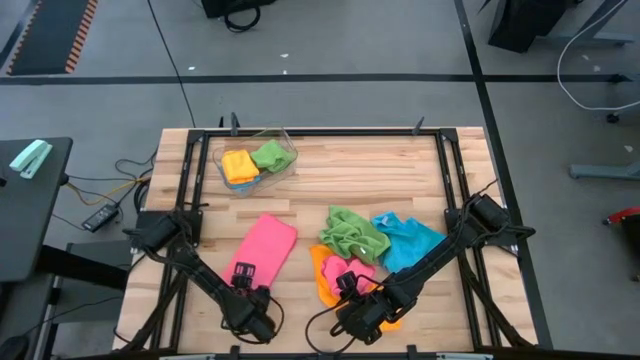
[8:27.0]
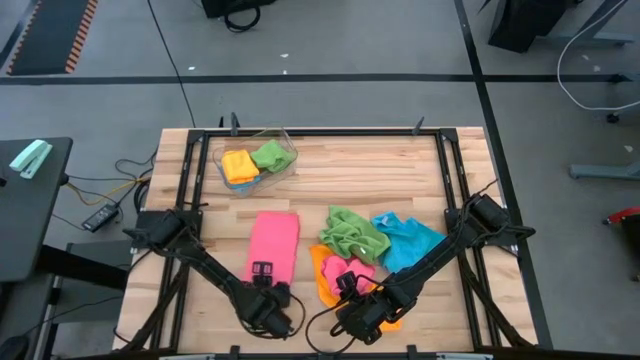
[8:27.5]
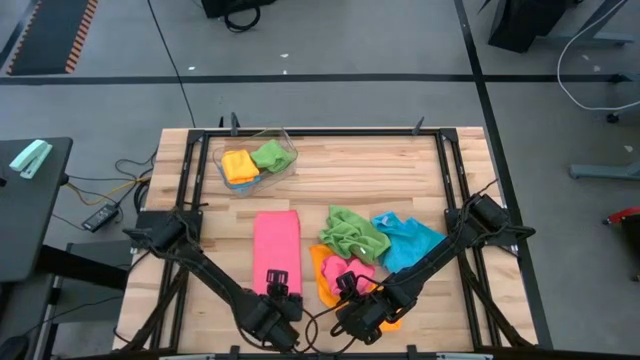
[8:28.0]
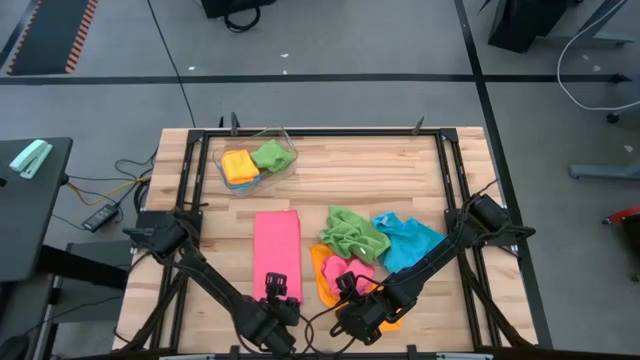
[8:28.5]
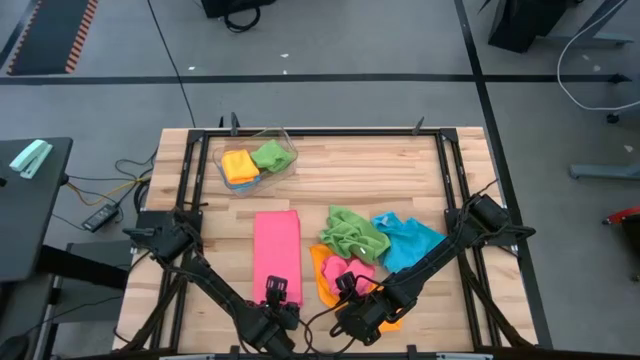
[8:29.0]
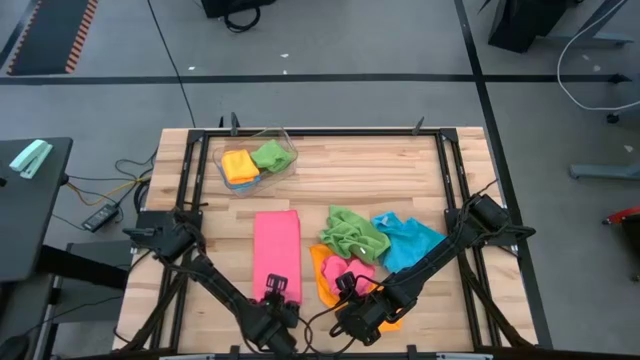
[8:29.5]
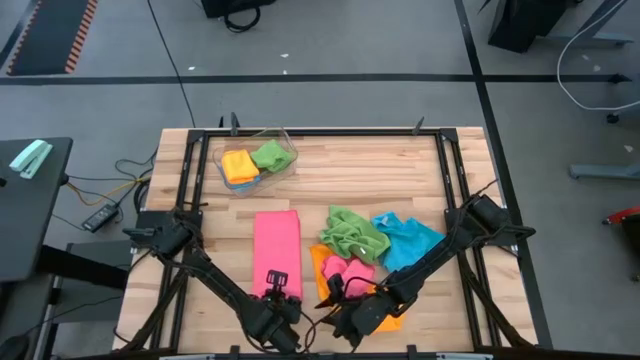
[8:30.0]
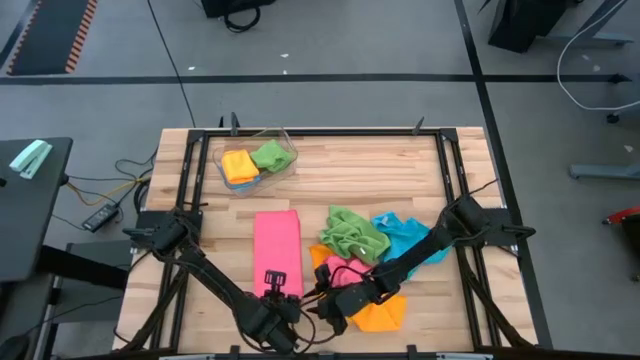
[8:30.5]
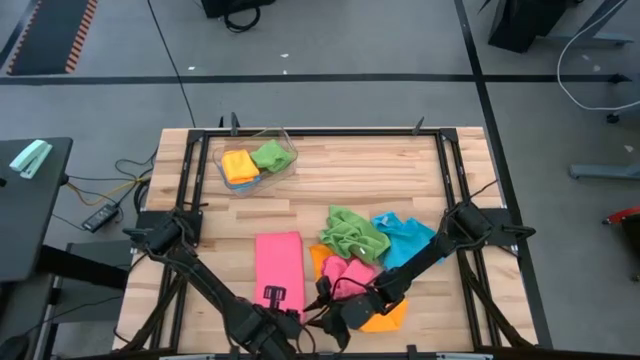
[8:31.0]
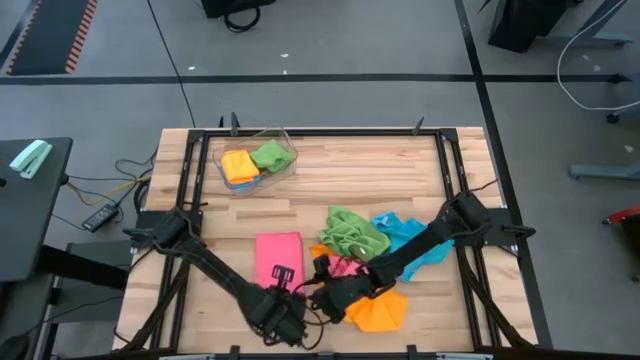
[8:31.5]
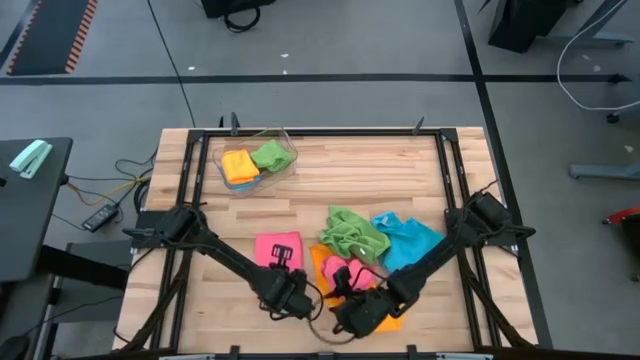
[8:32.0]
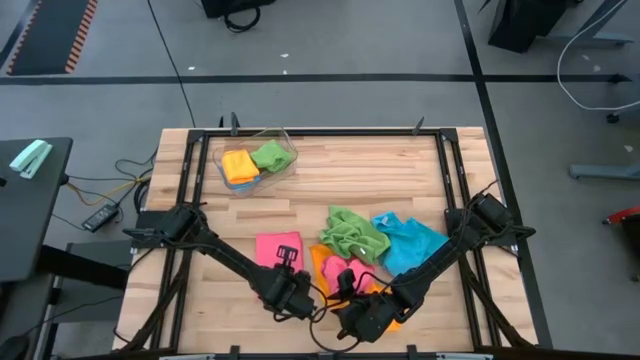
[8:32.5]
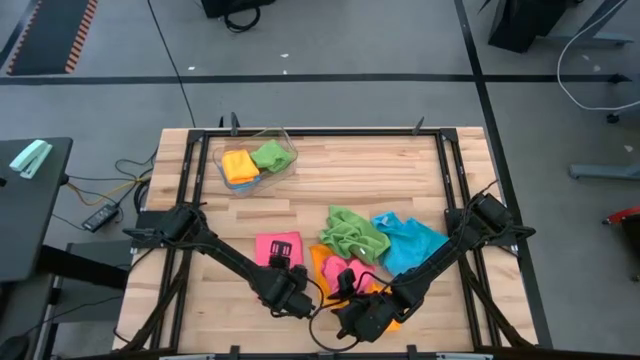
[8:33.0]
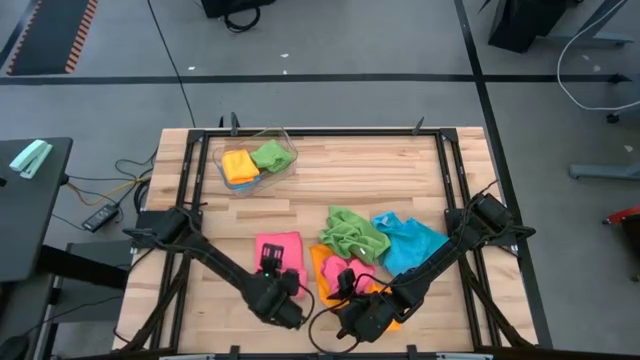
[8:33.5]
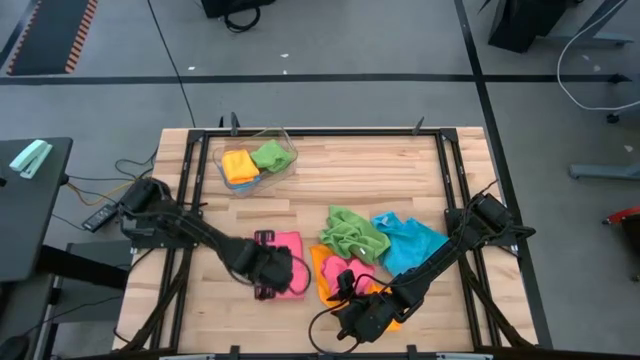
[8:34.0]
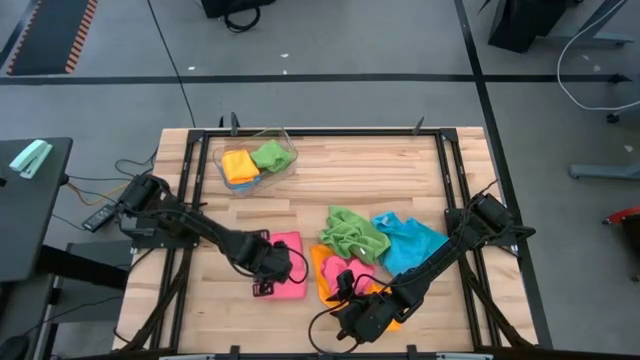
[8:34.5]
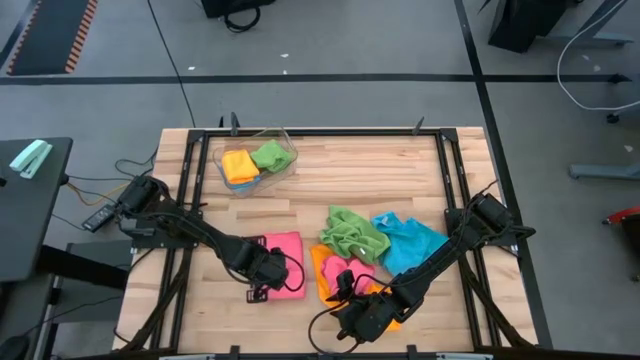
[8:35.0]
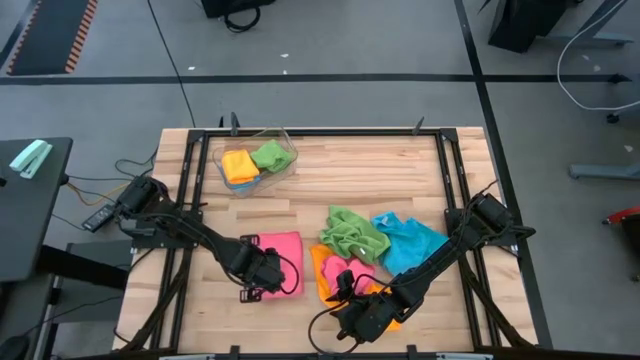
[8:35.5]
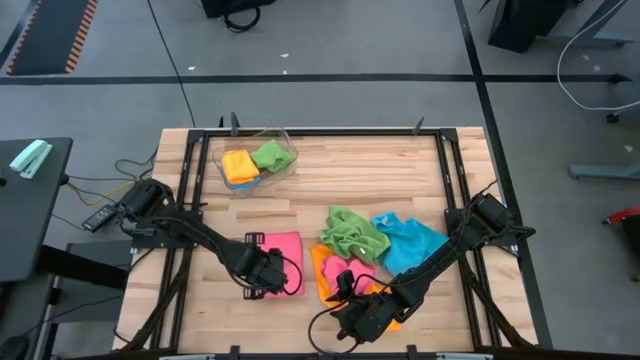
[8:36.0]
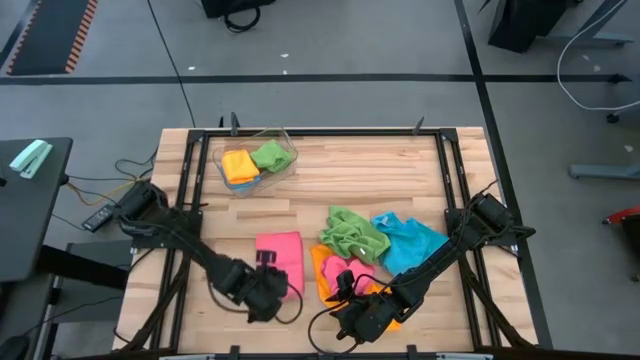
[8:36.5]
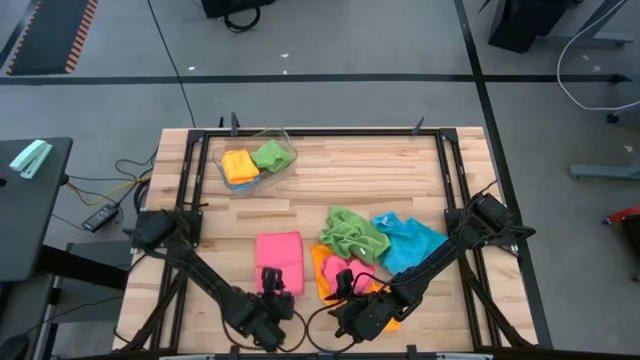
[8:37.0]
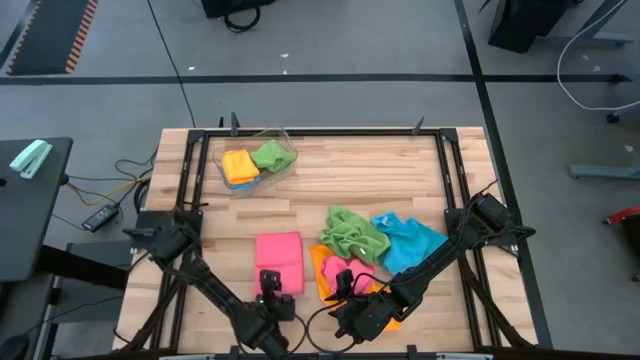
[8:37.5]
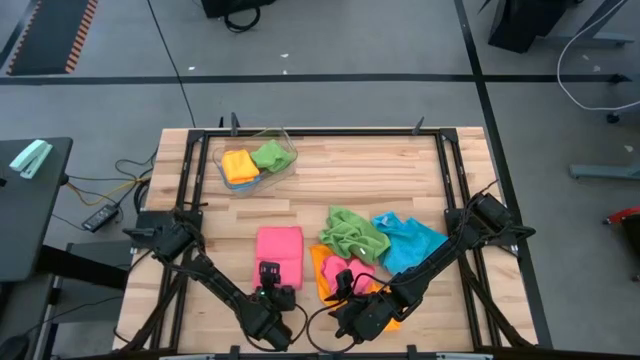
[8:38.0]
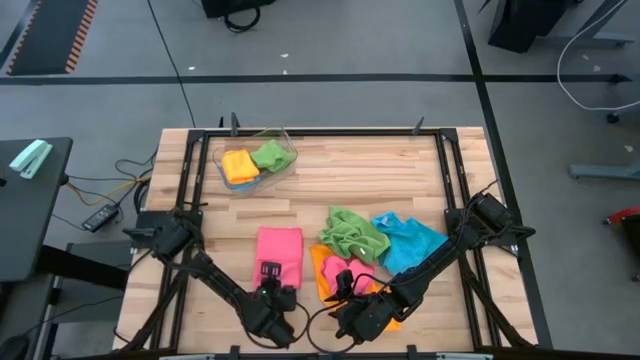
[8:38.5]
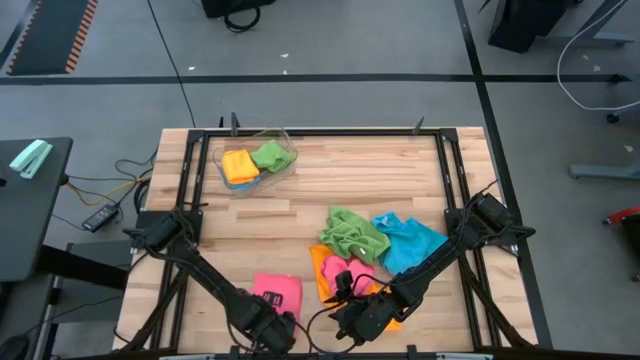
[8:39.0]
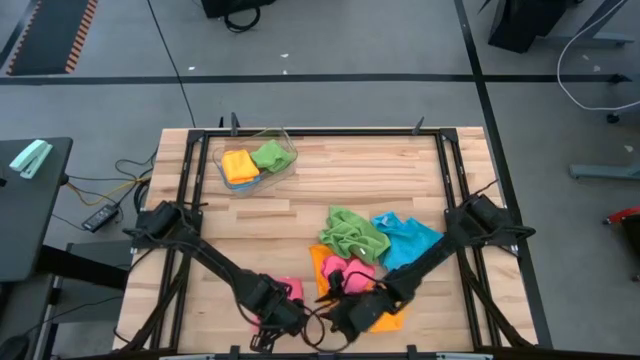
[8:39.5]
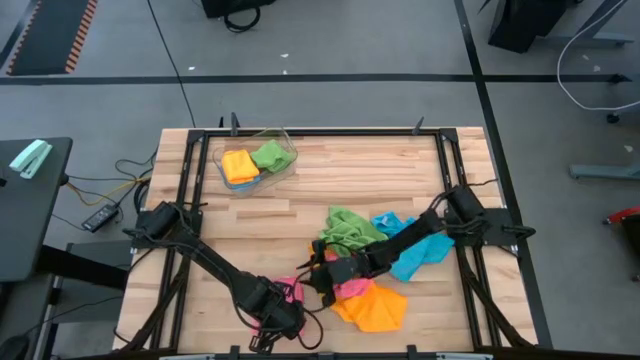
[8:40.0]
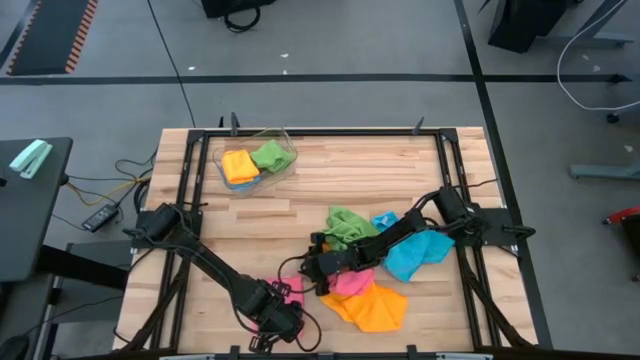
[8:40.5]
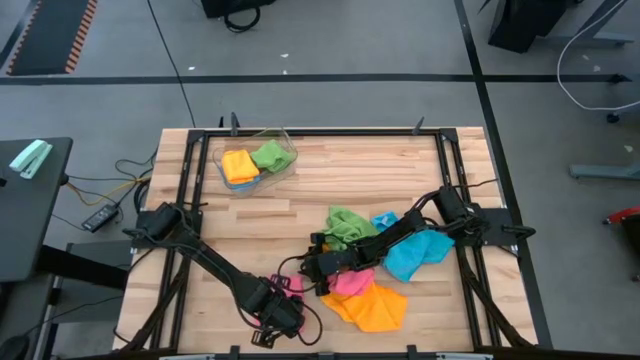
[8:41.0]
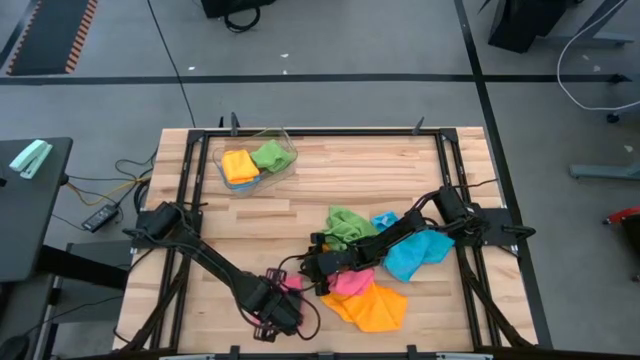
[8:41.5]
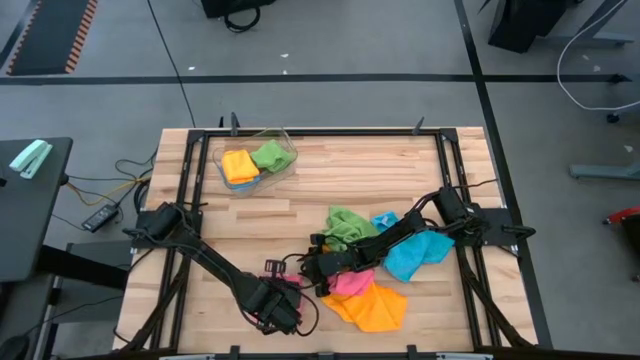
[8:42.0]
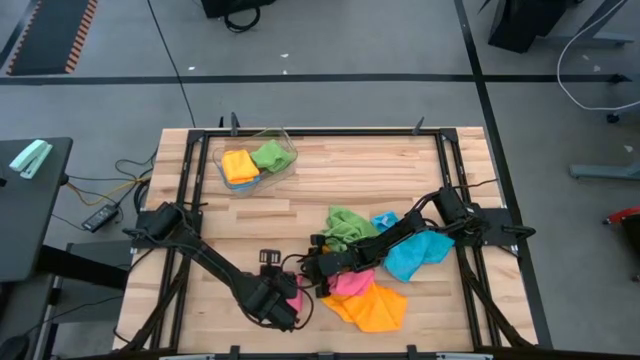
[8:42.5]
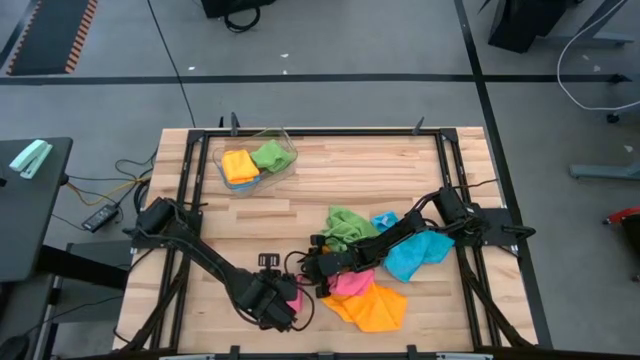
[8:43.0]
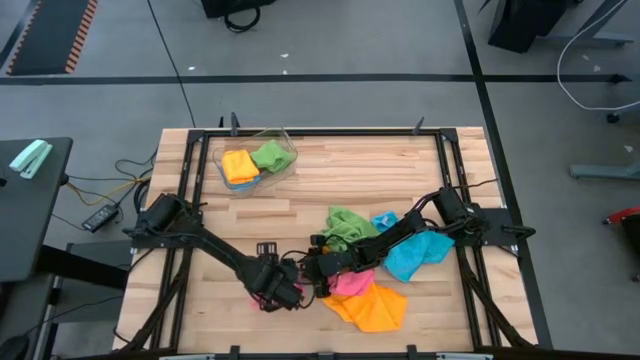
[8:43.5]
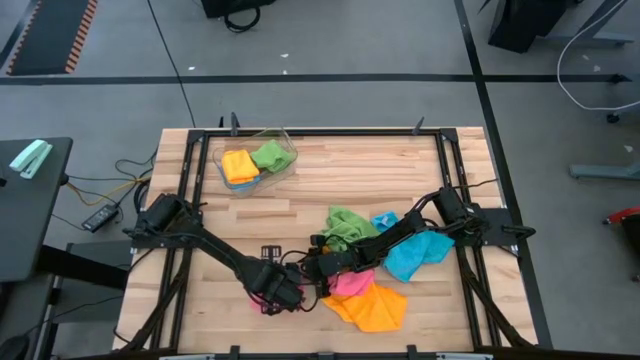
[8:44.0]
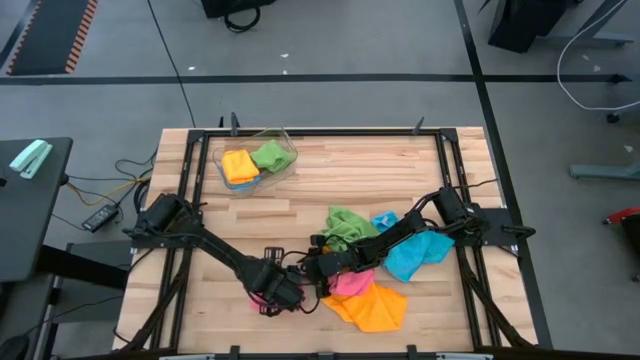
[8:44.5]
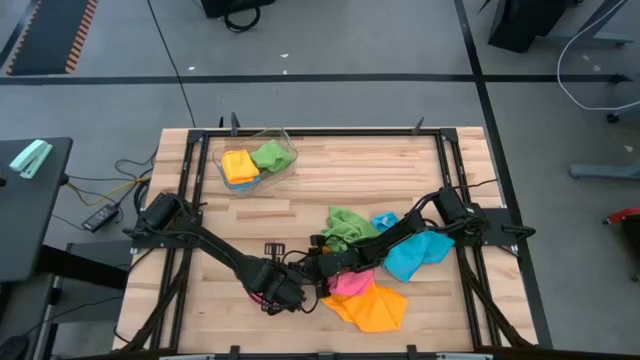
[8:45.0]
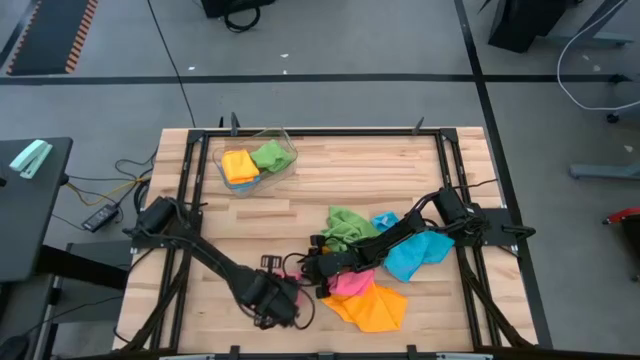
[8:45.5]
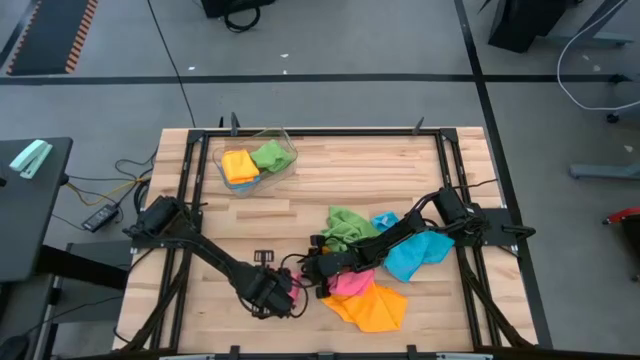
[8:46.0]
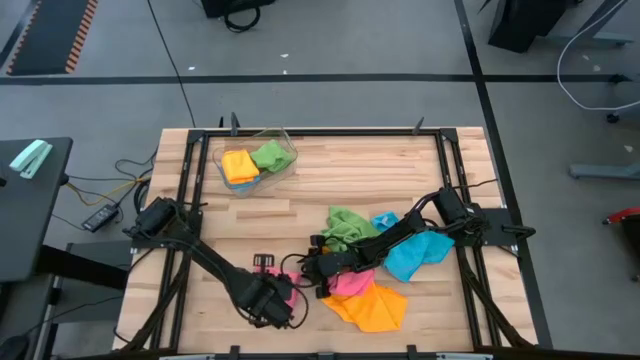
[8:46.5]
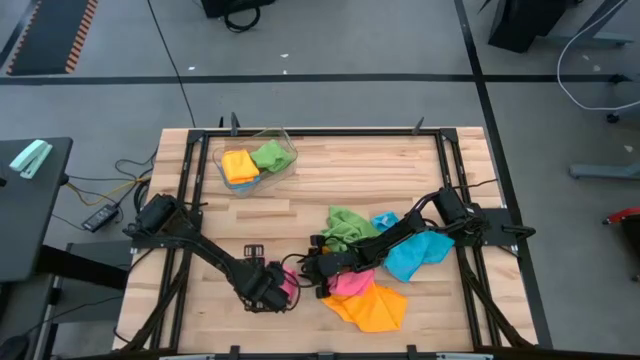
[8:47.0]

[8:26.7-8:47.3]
Task: Fold microfiber towels
Fold the left pink microfiber towel
